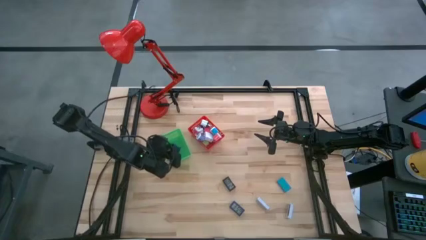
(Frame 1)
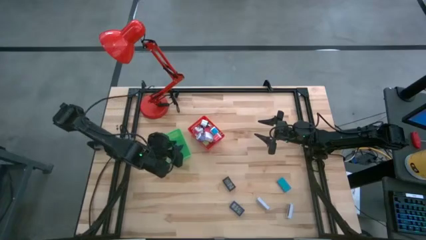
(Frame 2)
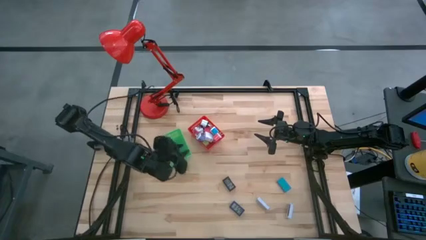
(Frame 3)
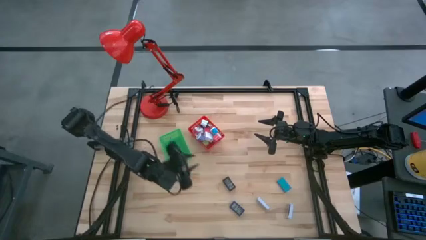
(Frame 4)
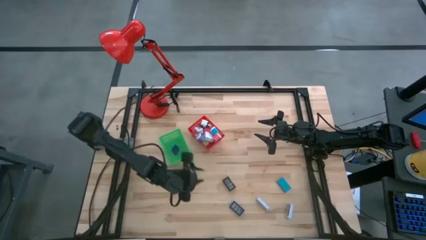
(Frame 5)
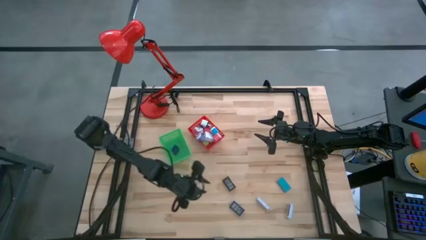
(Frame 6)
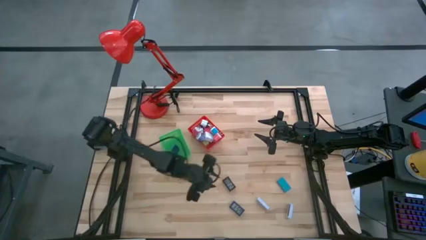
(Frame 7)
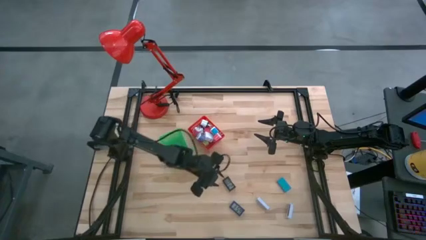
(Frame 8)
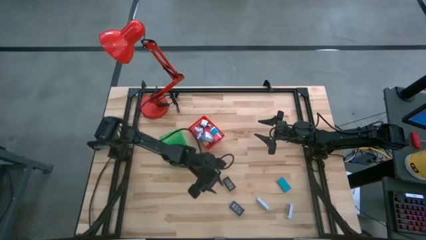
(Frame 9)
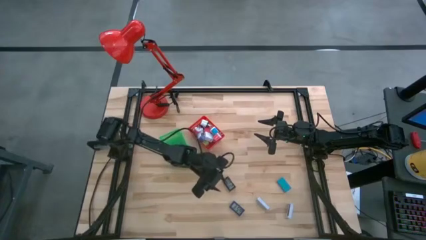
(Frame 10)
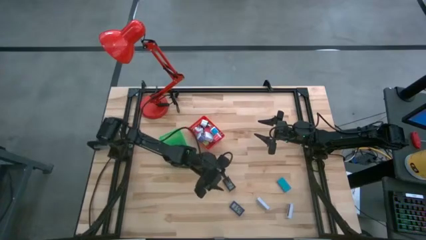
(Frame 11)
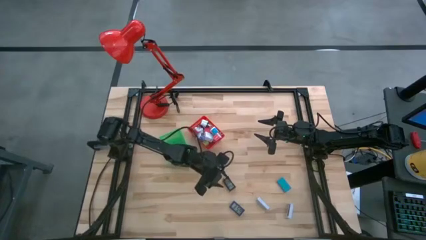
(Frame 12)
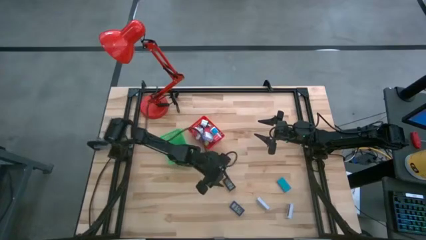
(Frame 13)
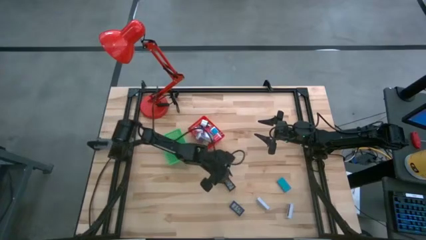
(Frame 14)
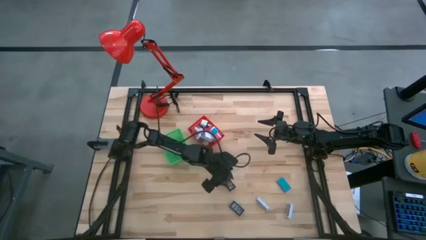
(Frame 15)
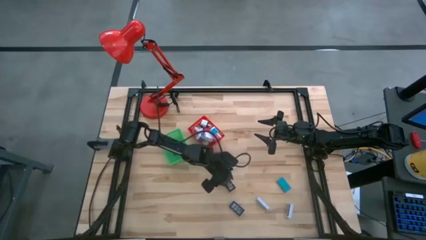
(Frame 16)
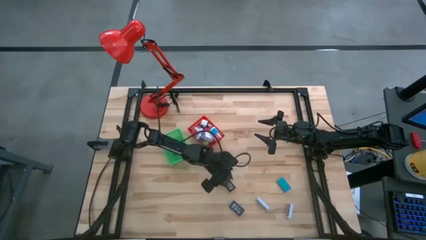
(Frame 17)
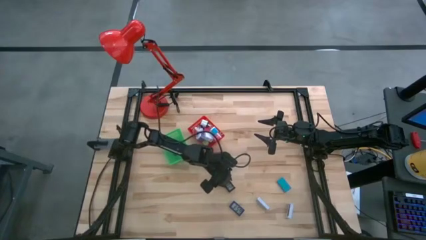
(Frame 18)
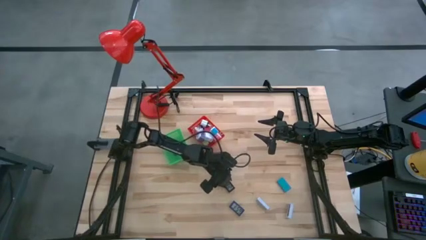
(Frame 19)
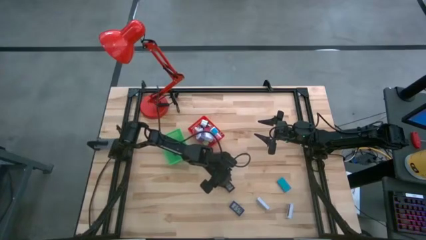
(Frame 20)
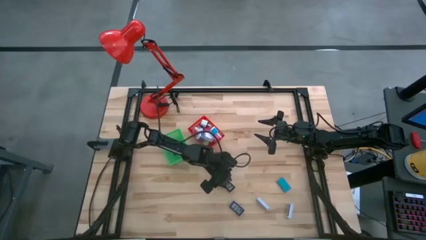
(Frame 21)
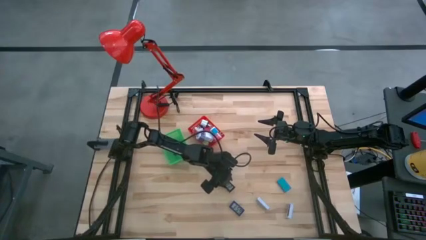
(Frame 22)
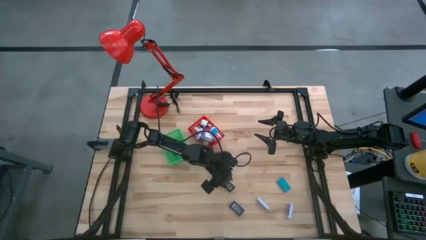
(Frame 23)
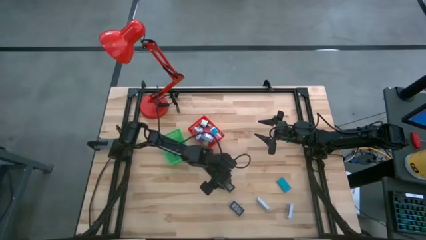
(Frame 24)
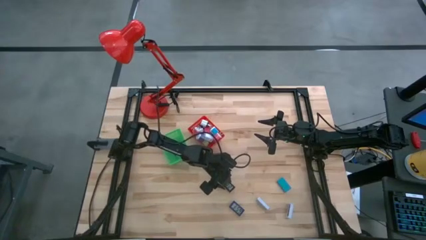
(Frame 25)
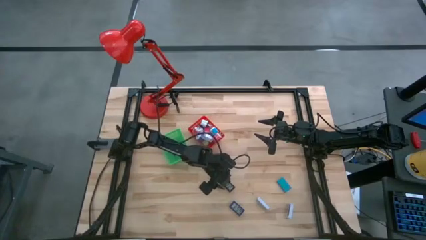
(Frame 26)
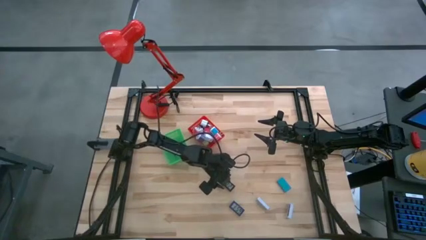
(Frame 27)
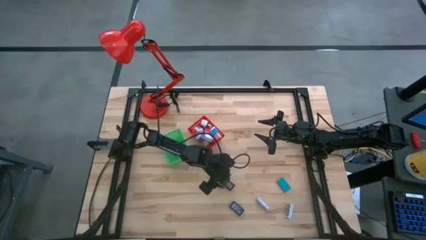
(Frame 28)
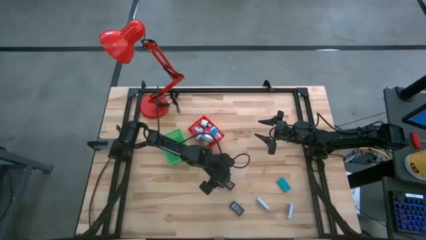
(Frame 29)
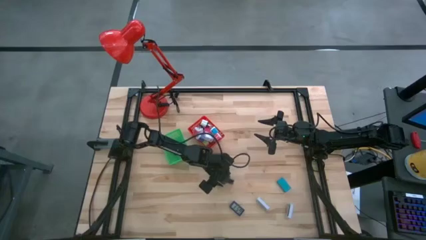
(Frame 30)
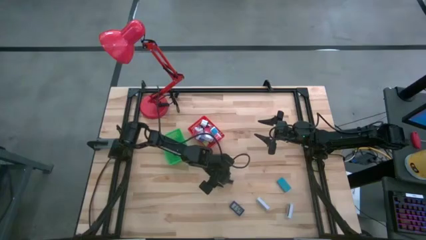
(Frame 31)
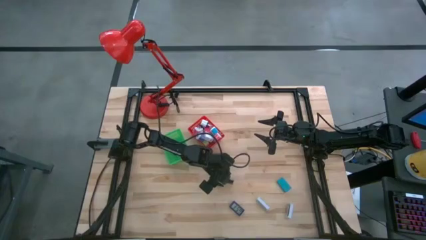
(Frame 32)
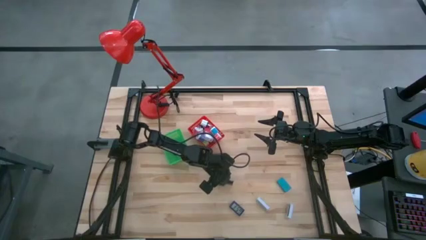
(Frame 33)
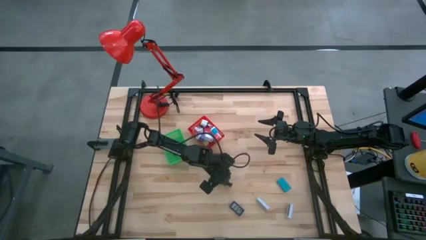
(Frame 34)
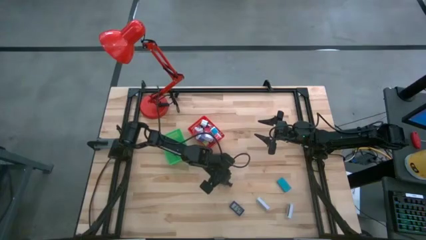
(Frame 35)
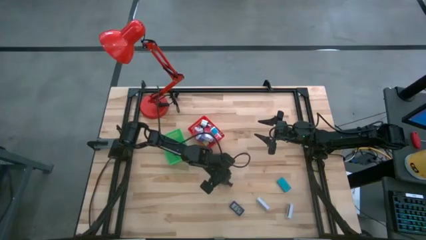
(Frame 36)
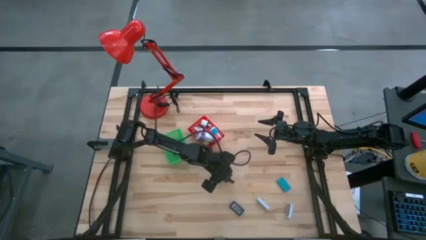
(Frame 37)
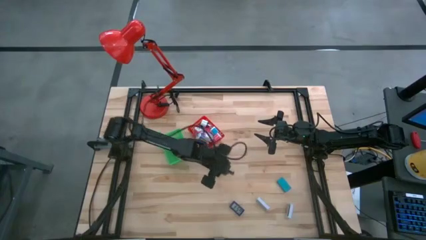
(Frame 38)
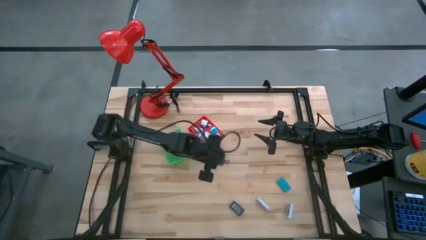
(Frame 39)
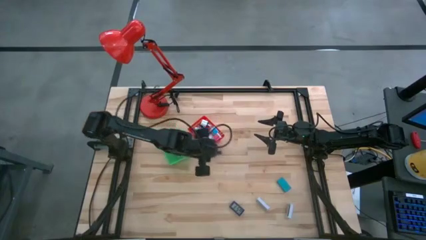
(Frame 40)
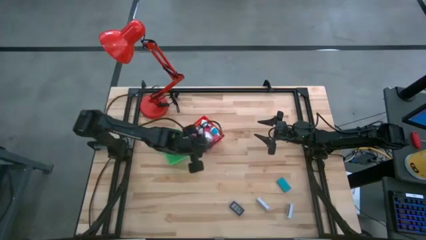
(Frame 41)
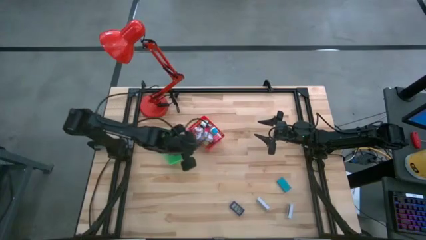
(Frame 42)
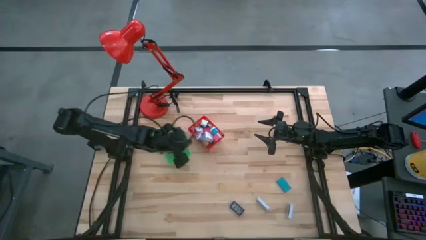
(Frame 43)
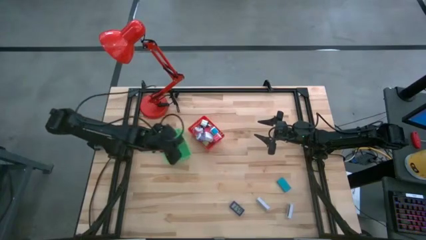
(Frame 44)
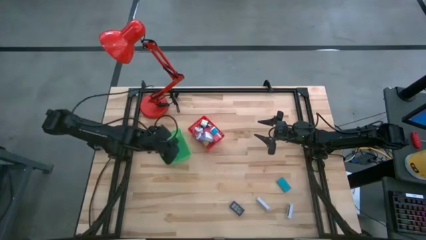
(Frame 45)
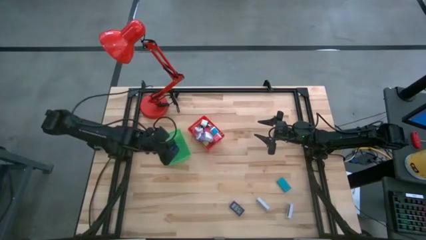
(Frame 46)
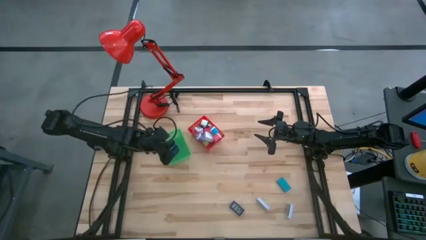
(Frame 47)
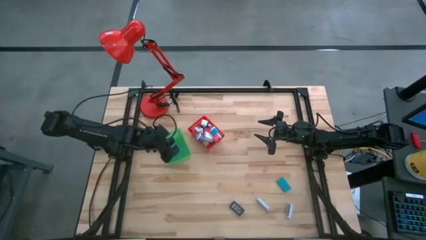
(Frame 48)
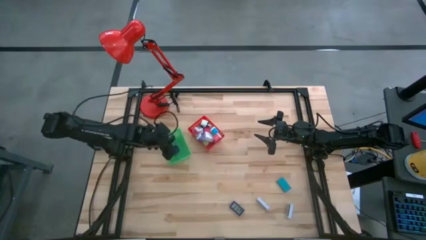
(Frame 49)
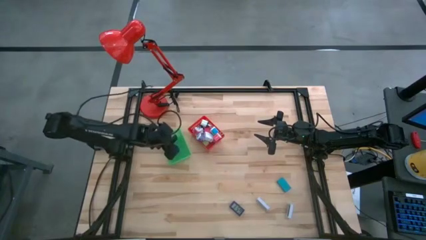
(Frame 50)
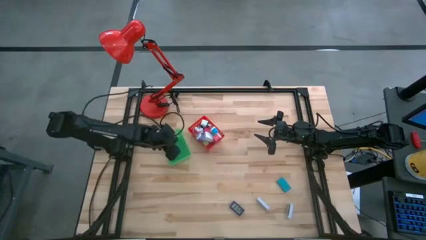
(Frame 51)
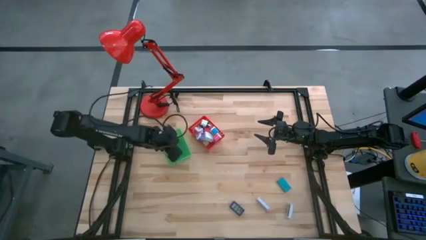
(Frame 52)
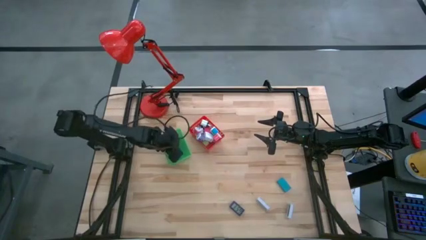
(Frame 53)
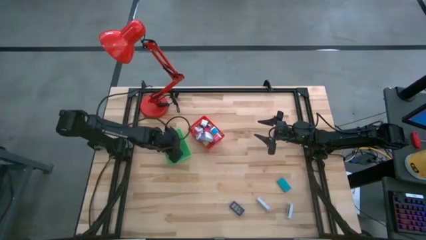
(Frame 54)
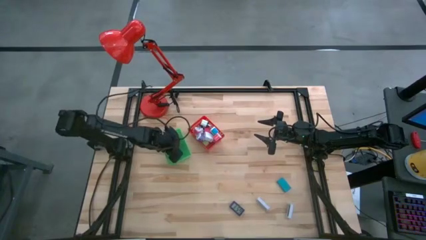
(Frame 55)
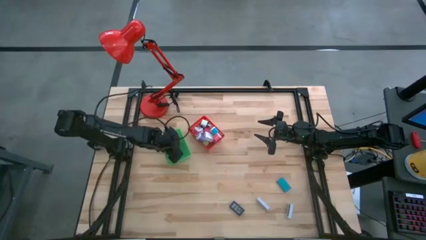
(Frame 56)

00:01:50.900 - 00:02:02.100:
Task: Pick & Place Office items
Put the black timer into the green bin

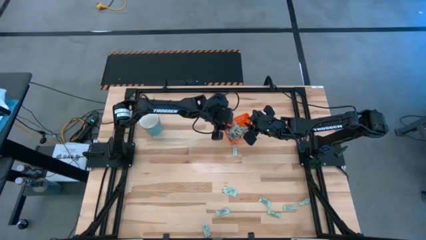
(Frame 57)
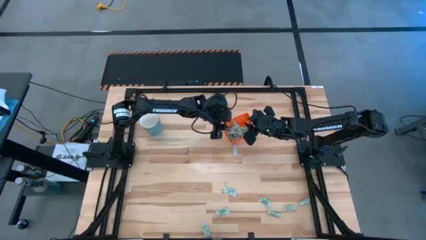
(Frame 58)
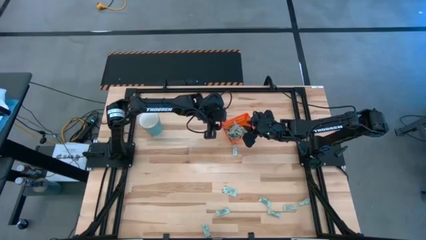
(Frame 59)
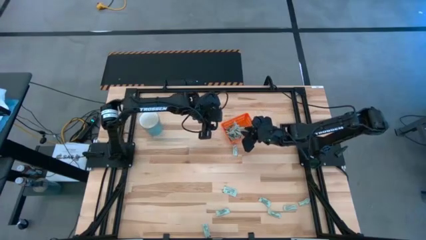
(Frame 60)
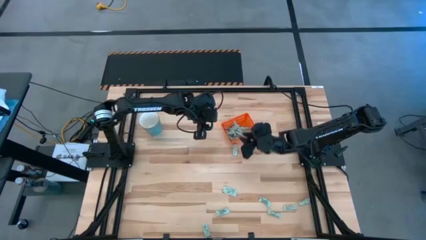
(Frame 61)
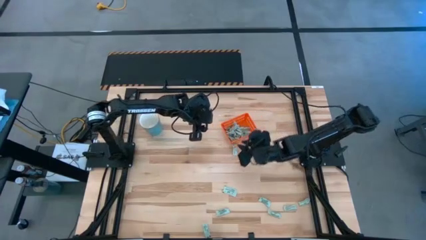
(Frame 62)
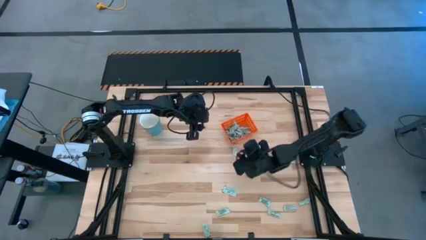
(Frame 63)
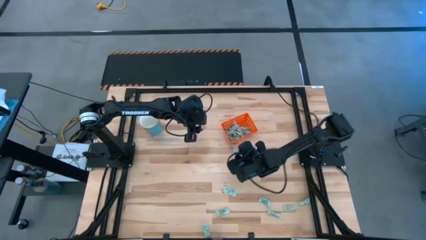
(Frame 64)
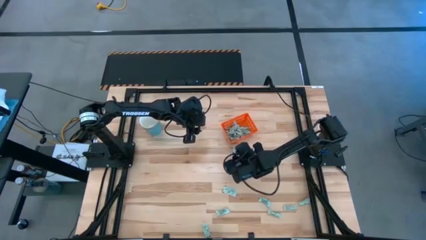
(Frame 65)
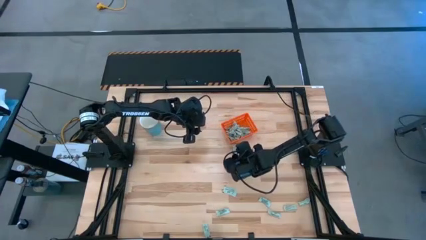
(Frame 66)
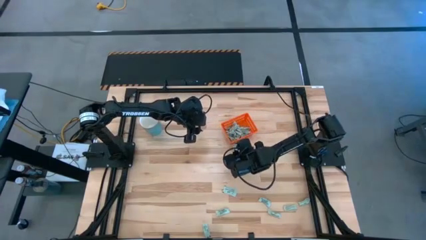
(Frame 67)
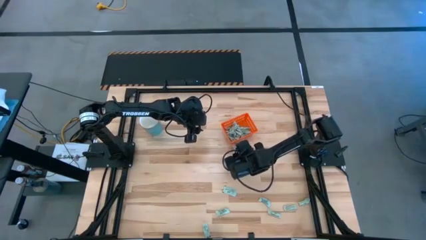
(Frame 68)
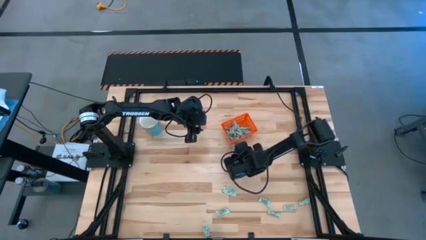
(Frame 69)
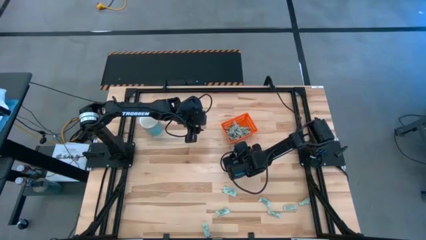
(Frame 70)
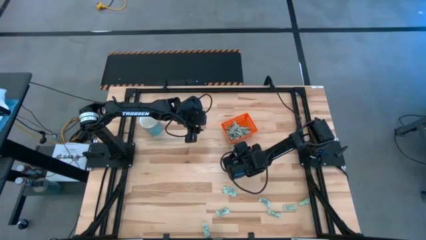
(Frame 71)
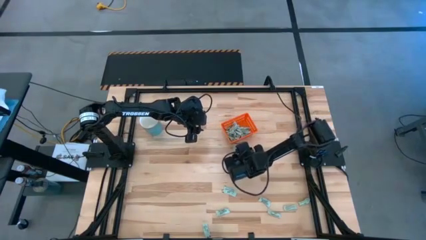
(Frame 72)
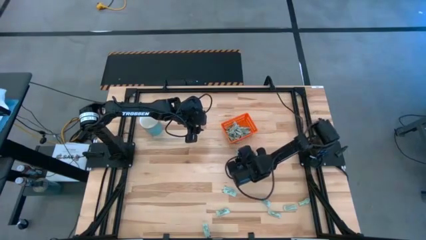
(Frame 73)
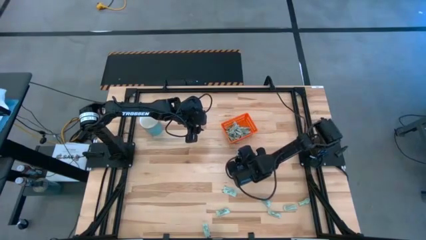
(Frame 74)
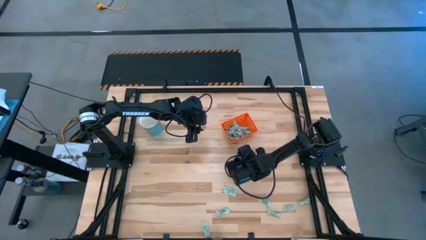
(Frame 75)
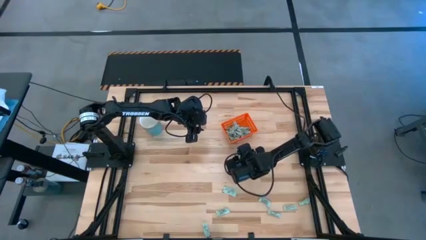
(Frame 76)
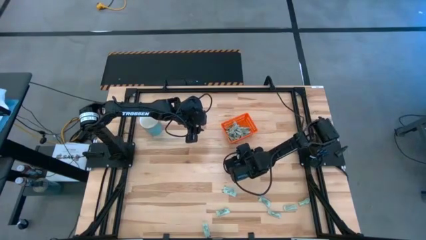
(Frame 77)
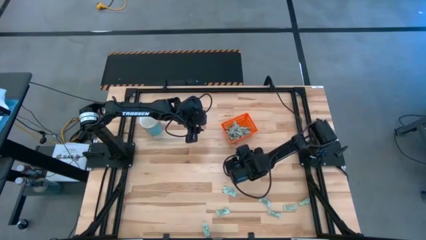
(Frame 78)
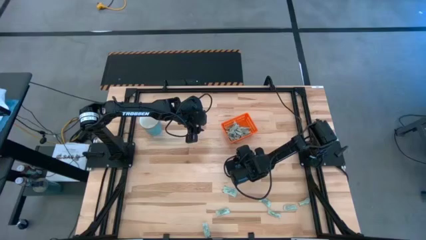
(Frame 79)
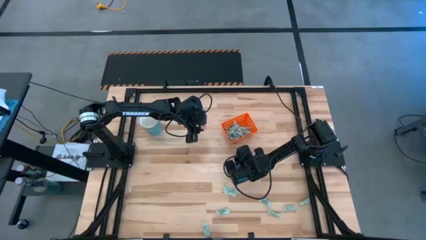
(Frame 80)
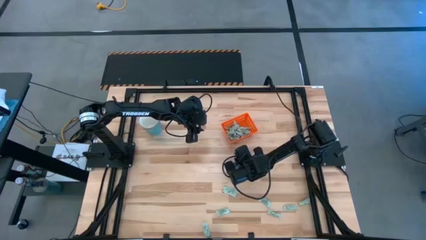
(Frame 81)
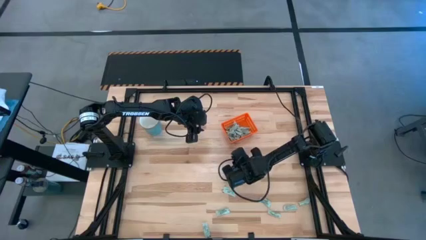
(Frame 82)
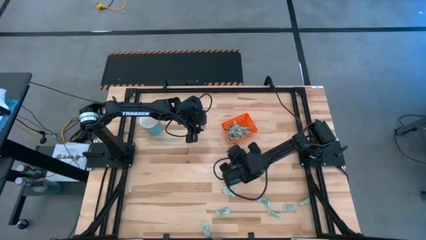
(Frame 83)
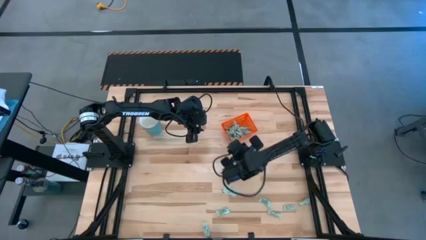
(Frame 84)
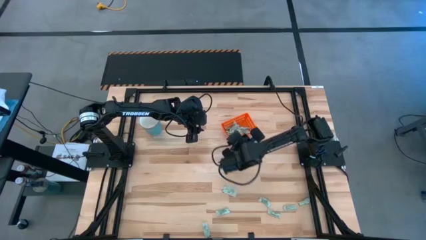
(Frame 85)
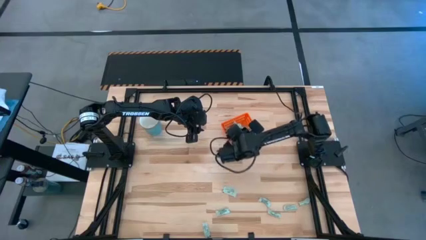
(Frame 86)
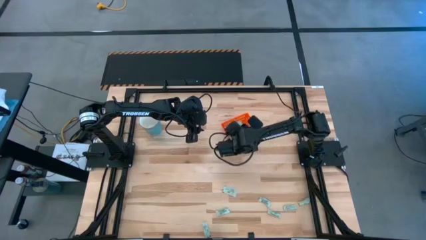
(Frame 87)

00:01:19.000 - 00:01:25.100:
Task: Pick and place Stevia / Truvia into bins
Put the stevia packet into the orange bin
